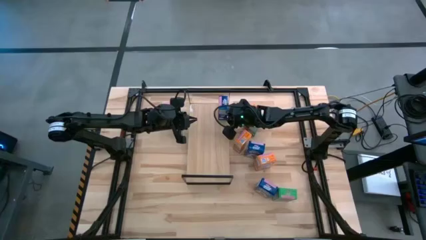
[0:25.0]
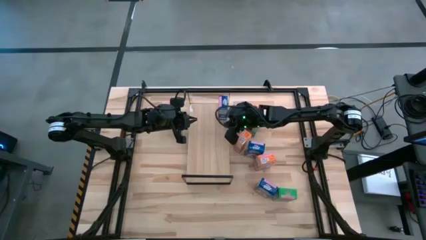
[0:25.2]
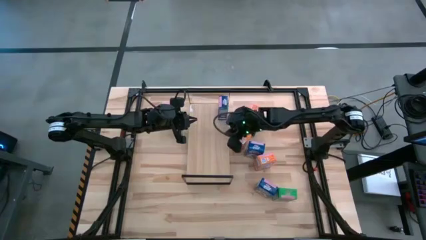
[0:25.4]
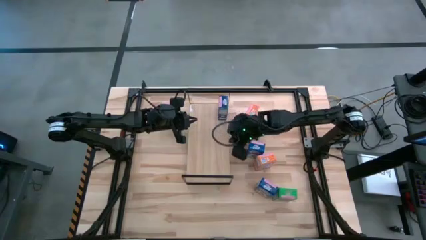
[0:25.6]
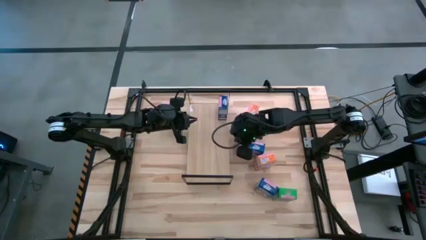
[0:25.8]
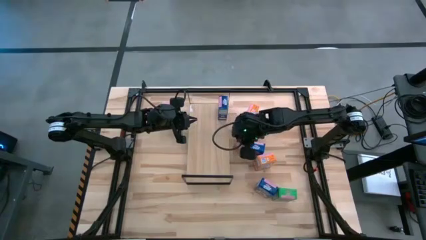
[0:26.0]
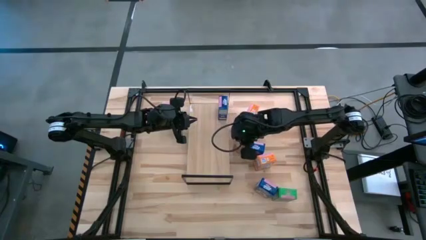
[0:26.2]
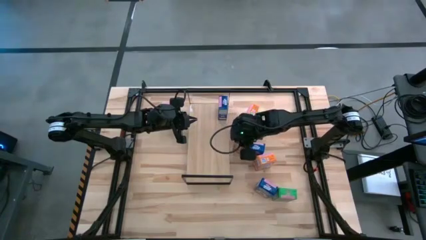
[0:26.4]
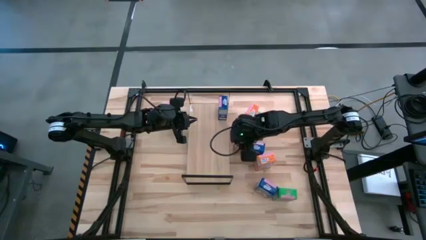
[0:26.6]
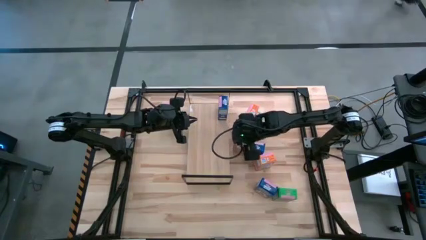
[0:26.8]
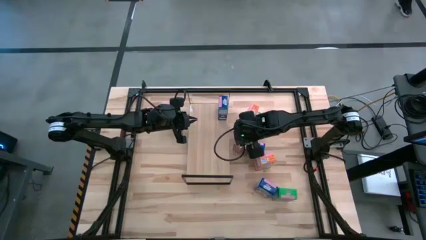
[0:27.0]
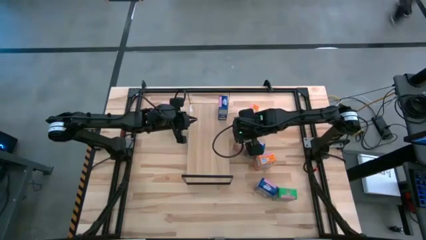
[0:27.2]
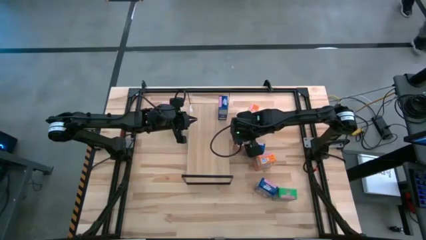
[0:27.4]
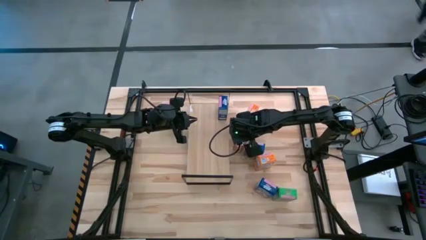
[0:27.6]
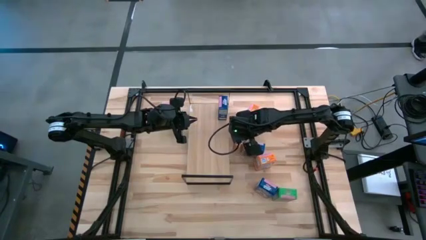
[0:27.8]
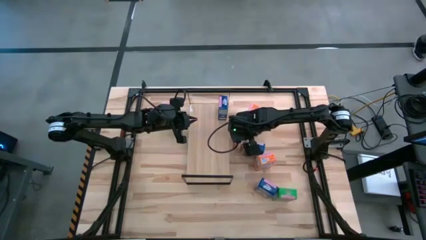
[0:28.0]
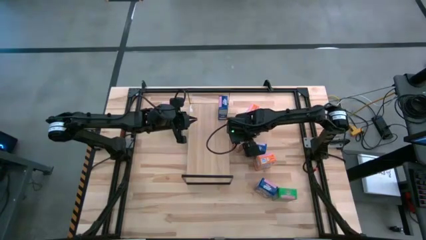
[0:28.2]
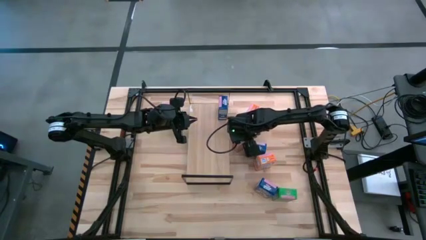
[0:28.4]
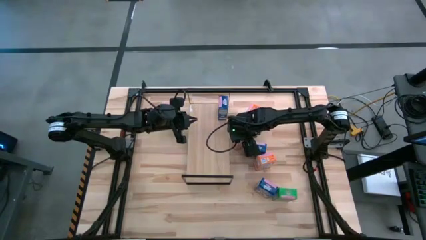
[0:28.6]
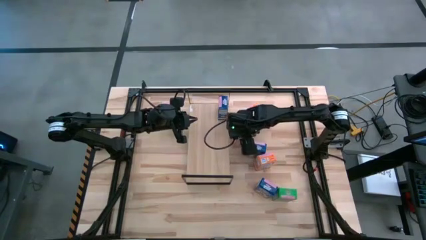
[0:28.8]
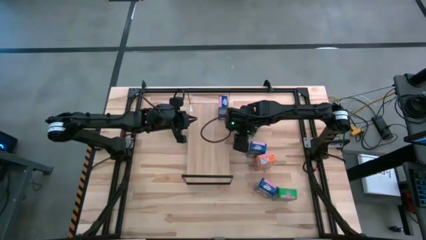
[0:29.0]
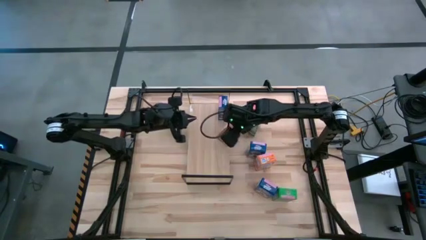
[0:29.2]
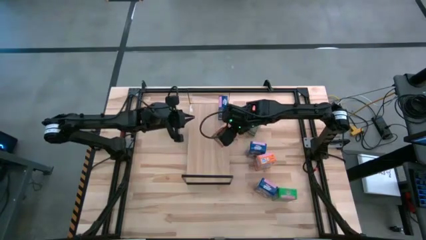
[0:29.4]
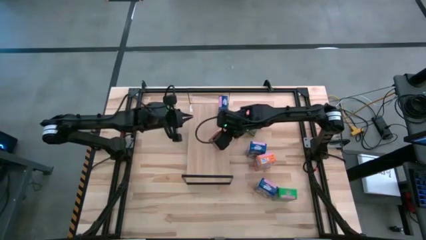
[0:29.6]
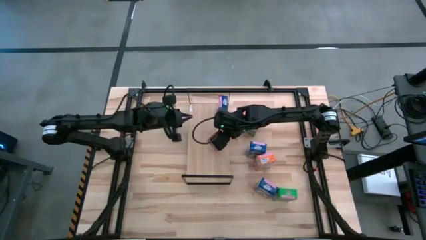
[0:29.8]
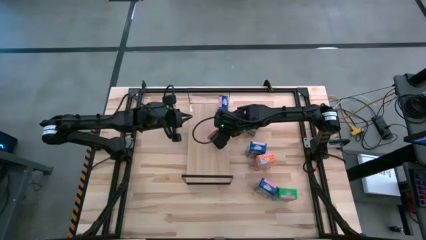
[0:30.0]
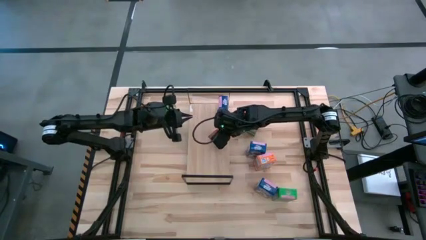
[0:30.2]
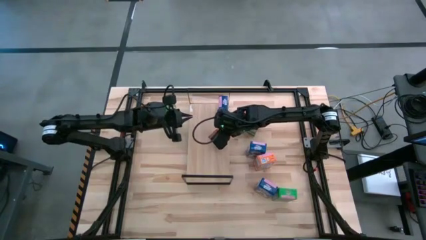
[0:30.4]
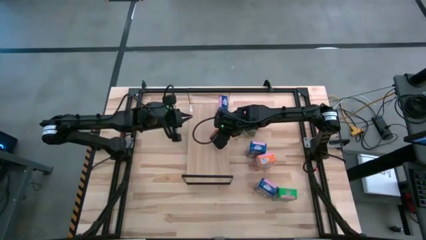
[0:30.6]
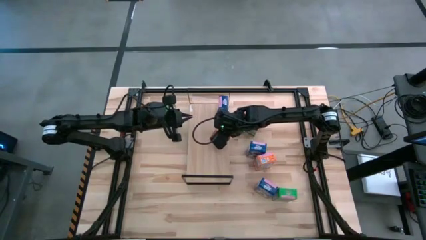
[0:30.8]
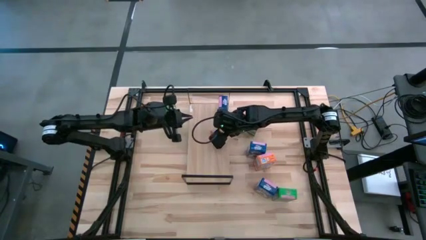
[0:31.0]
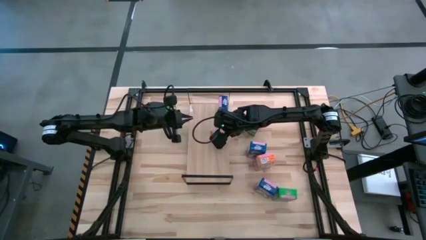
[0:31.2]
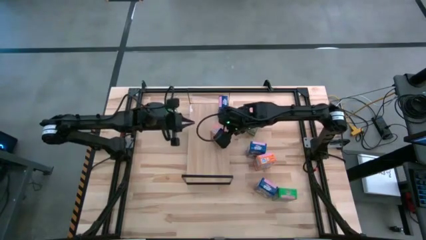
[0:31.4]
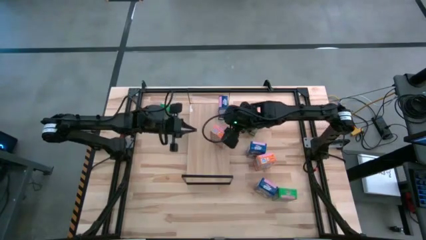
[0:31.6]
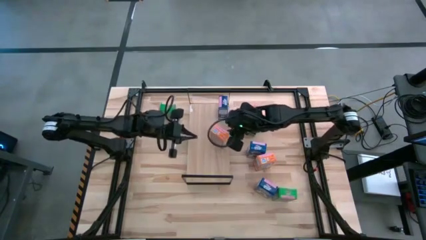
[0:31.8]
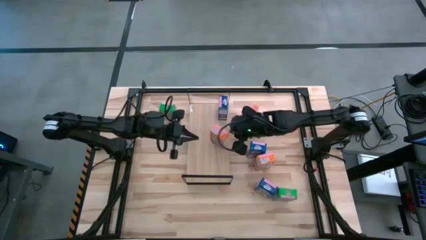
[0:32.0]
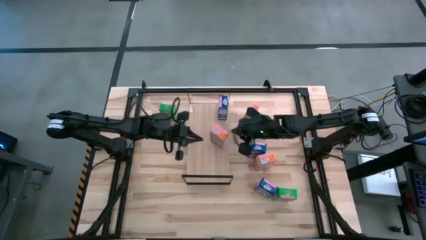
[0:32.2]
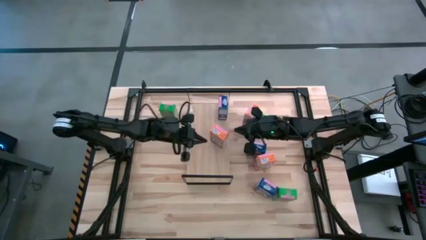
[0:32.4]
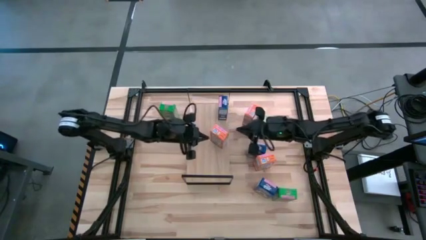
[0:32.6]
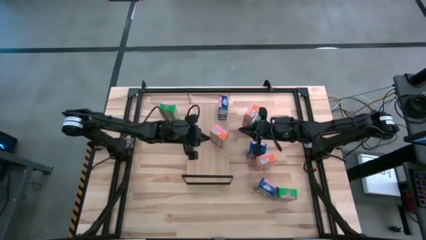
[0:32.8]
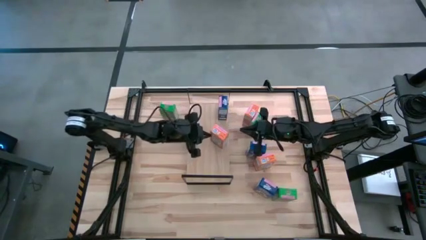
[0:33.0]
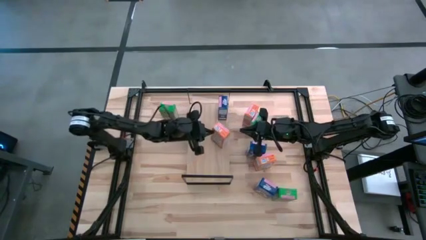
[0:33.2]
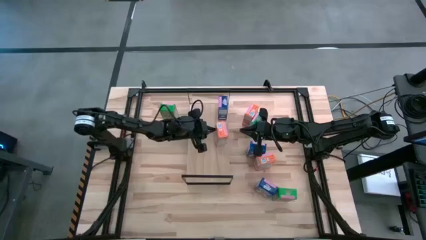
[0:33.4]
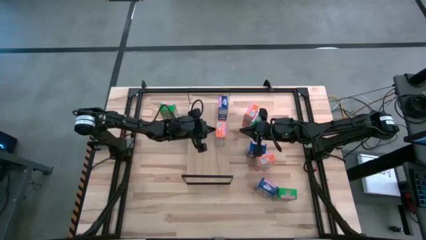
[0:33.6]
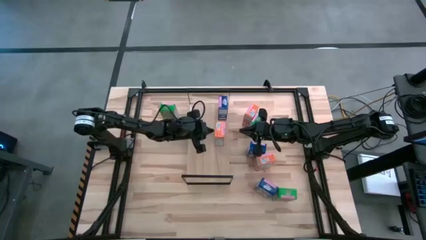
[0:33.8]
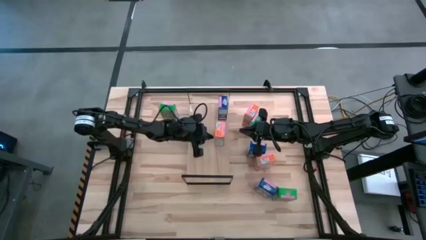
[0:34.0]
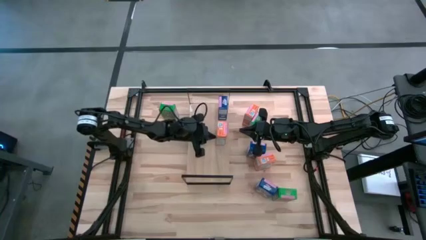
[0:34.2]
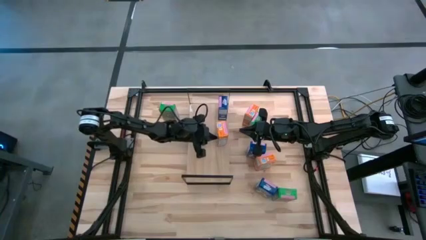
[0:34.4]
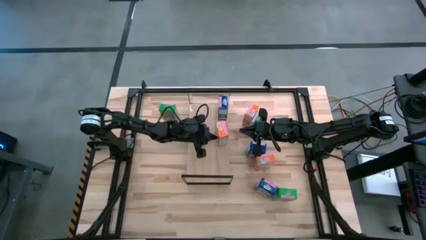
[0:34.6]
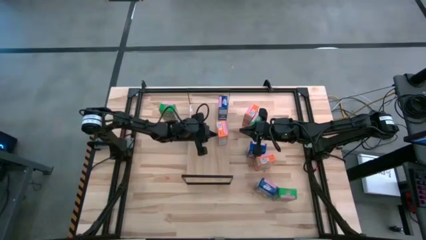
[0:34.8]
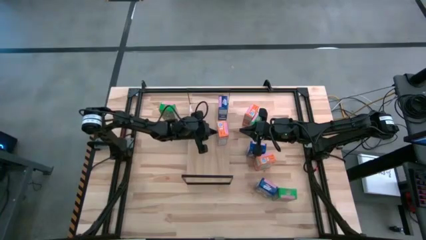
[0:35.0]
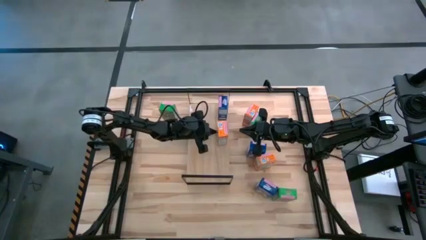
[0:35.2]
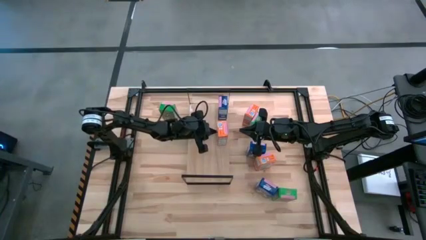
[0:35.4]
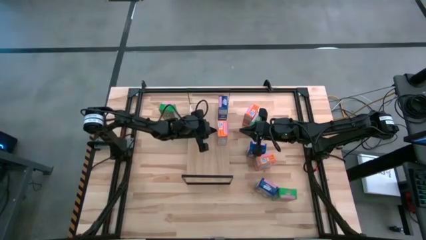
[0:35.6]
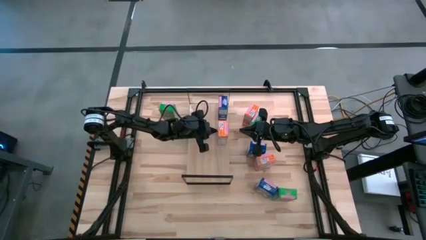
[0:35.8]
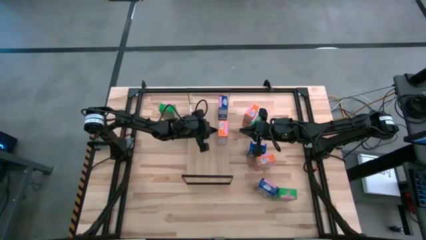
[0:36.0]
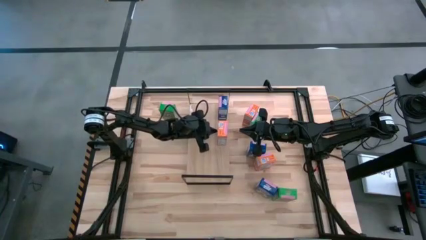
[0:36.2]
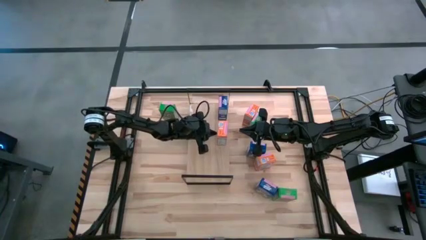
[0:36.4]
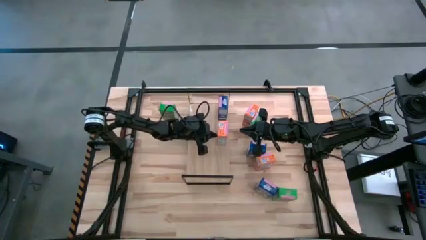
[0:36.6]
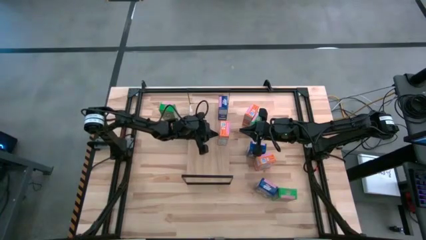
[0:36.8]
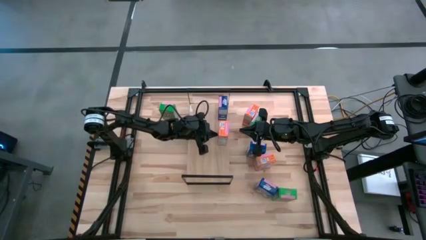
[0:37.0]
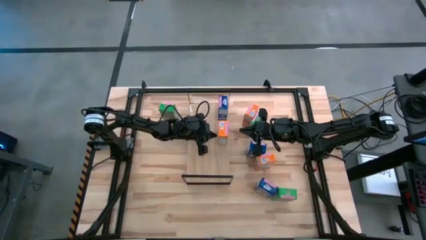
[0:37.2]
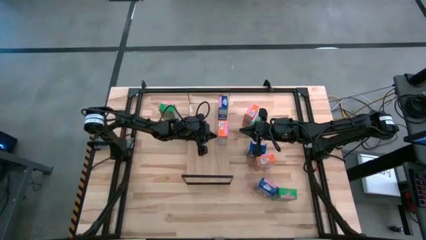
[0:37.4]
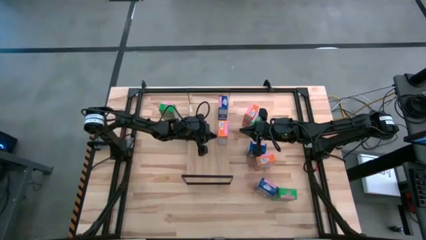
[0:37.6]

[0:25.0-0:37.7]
Task: Stack cereal on shelf
Put the middle orange cereal box on the shelf

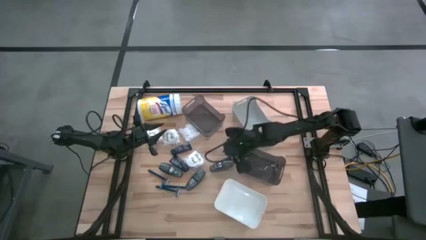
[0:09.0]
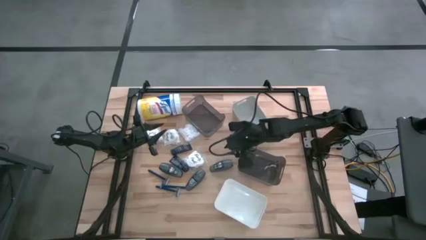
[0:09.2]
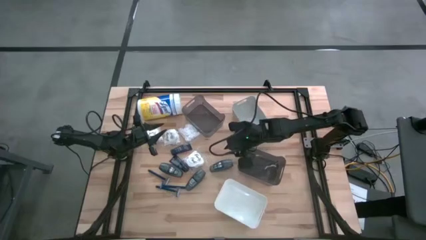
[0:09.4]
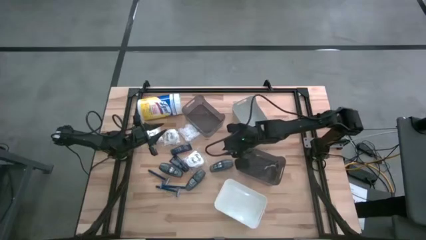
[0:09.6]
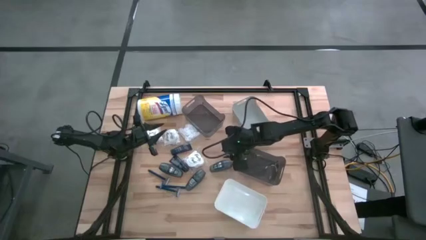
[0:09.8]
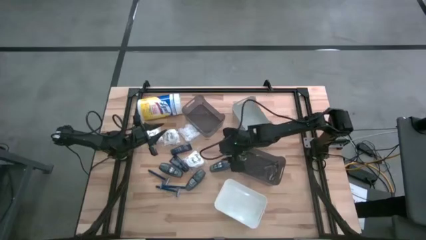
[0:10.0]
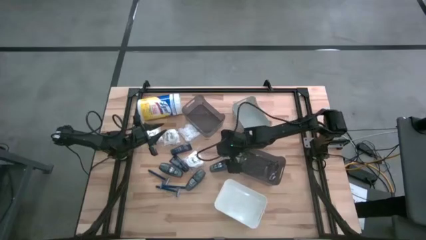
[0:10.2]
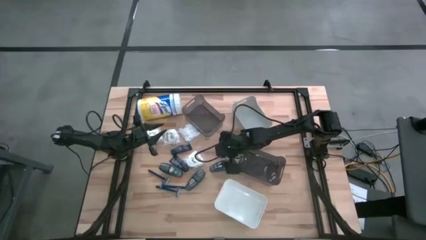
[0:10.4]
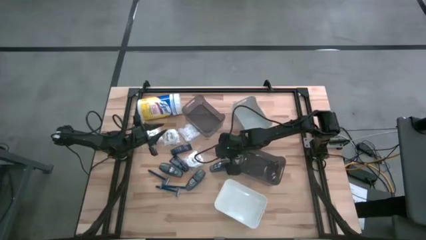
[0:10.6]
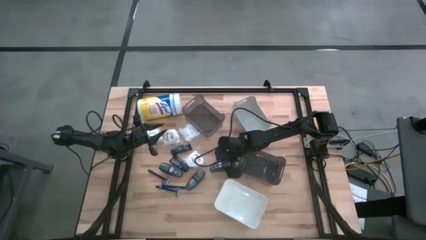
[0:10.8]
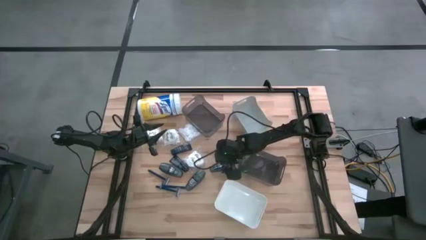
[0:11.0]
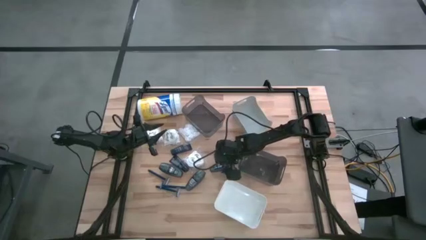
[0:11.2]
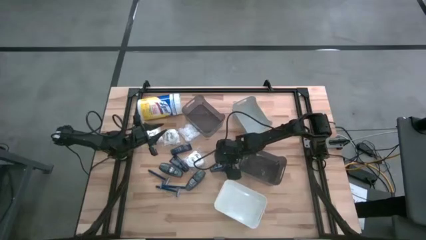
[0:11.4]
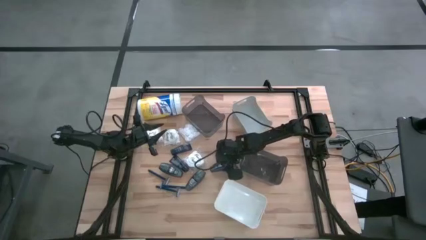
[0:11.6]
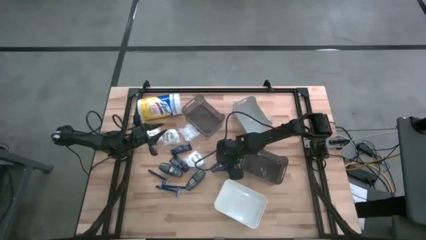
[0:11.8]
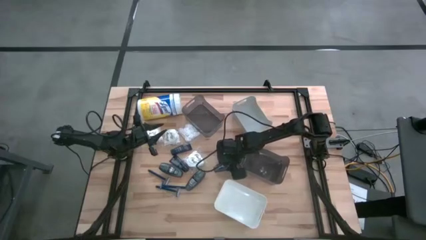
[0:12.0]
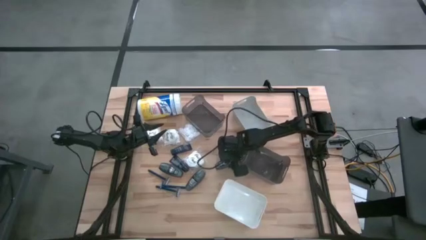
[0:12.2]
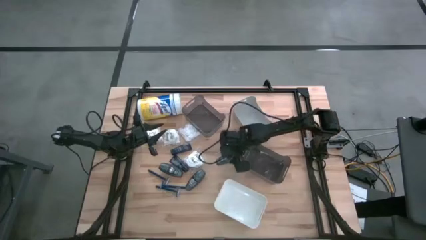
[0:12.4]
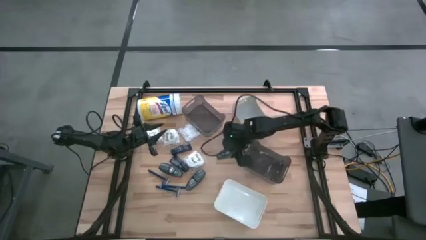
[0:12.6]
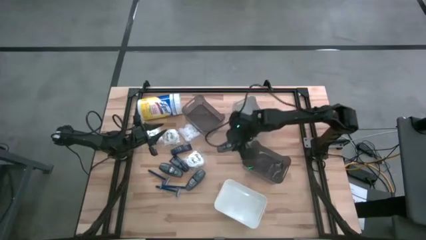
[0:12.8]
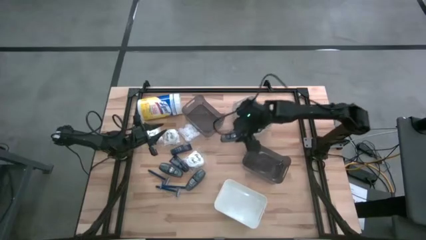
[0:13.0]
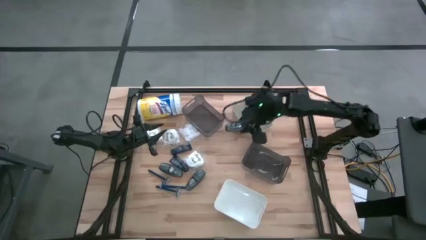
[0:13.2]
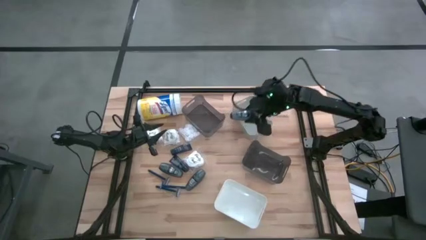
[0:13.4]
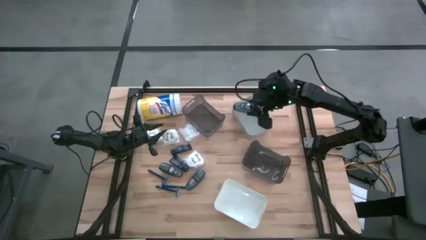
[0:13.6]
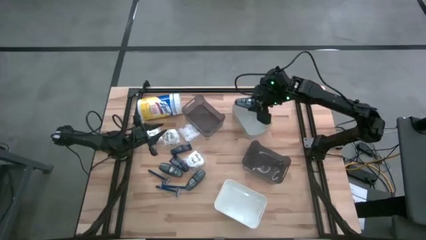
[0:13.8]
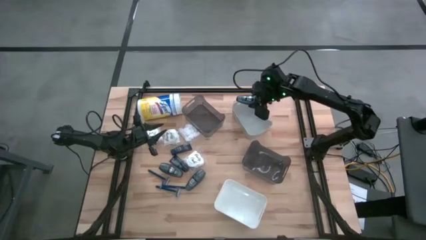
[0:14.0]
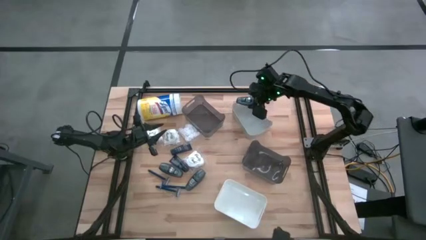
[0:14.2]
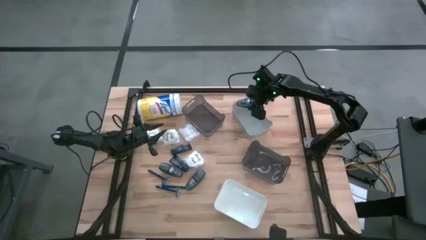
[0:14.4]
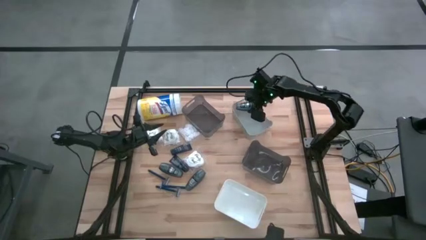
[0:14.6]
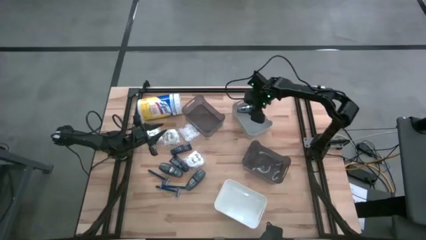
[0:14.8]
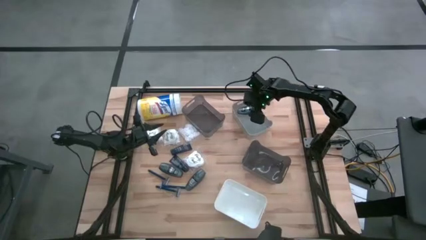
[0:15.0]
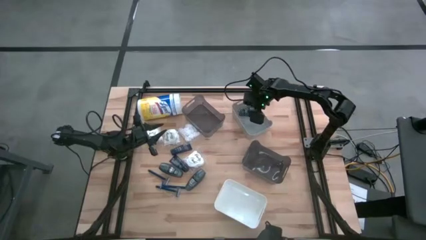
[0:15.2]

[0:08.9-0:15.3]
Task: Pick & Place Travel size toiletries
Put the gray deodorant into the gray bin
